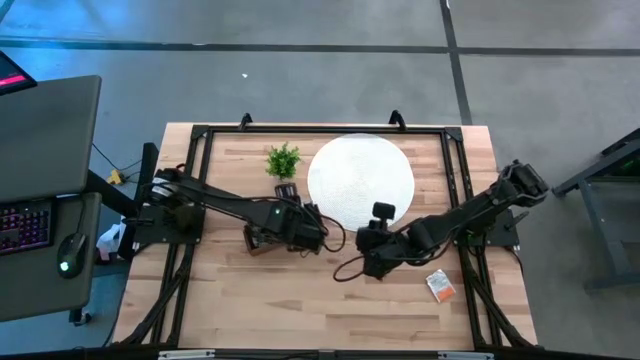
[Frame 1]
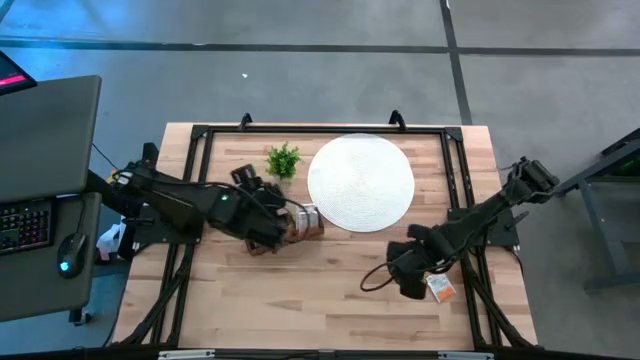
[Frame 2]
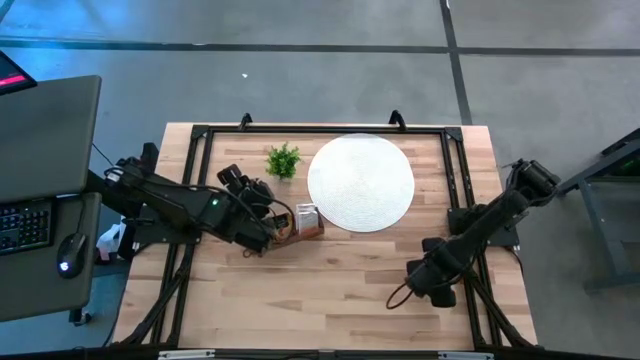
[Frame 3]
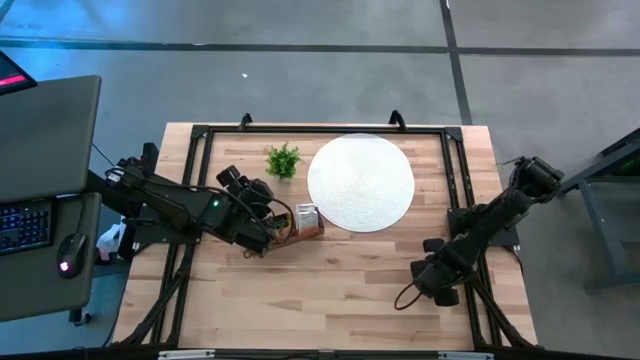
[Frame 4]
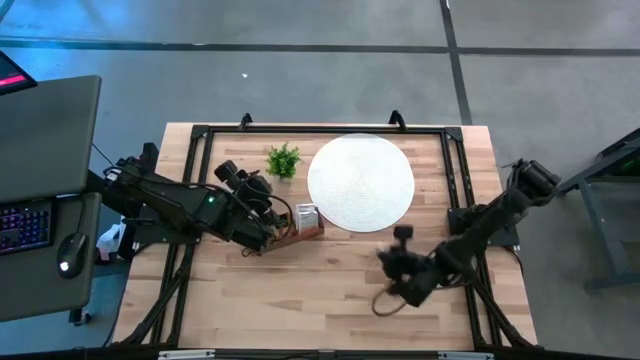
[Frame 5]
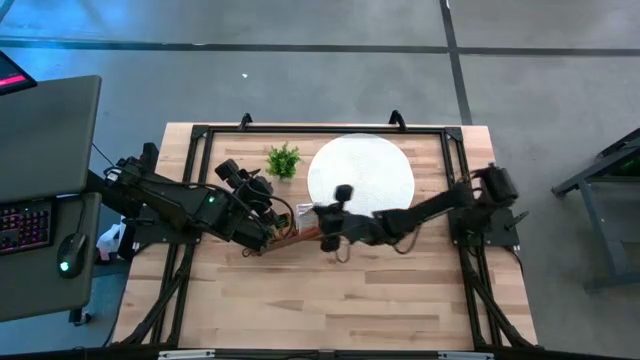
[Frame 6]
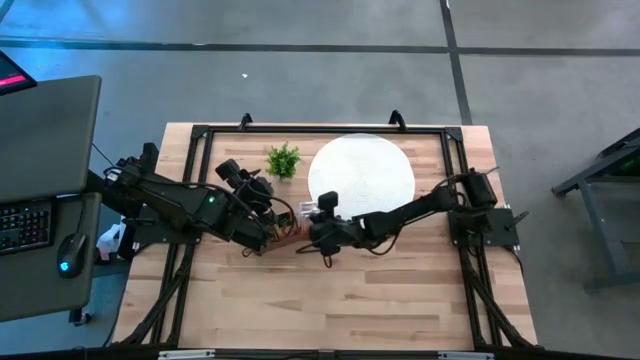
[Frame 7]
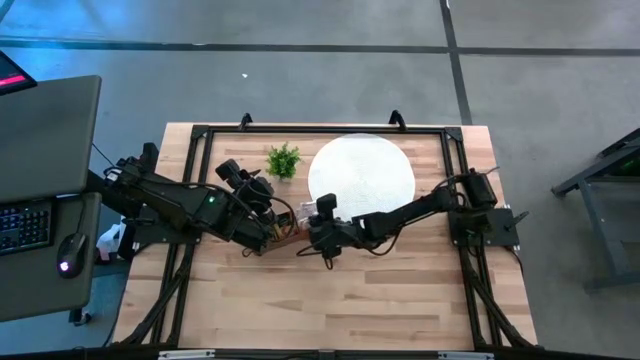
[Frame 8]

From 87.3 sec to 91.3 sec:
Task: Pick & Place Tea
Put the orange tea bag into the right section of the wooden organizer

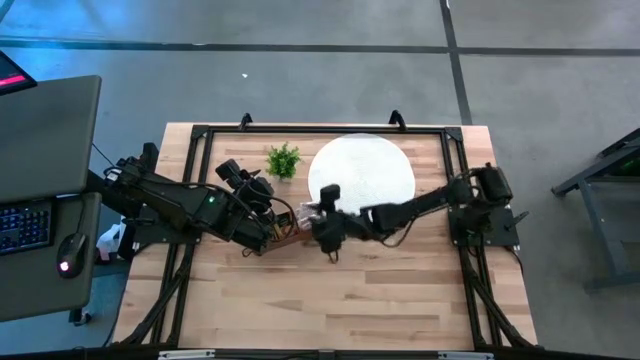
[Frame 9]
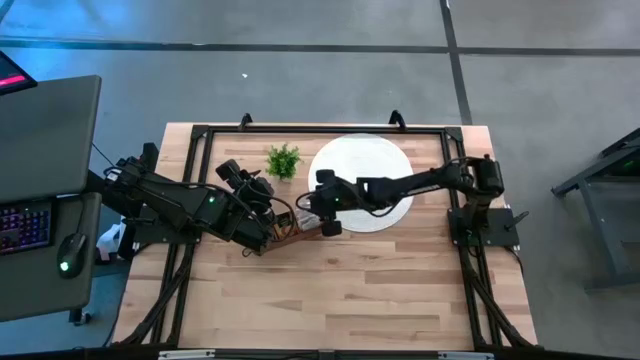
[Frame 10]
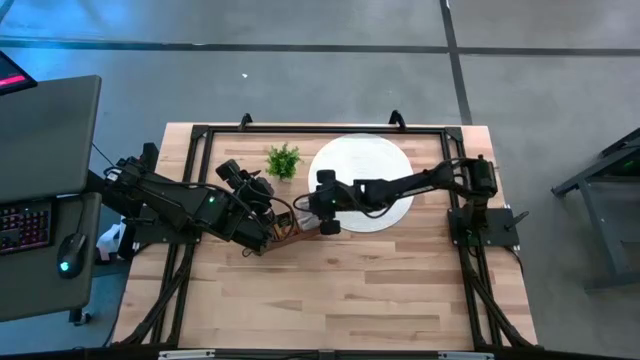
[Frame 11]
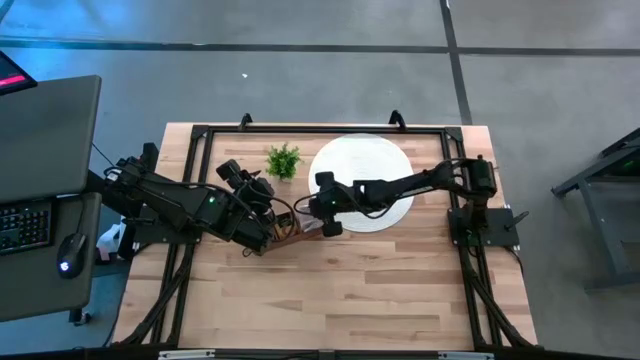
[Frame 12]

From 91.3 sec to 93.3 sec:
Adjust the orange tea bag in the wooden organizer

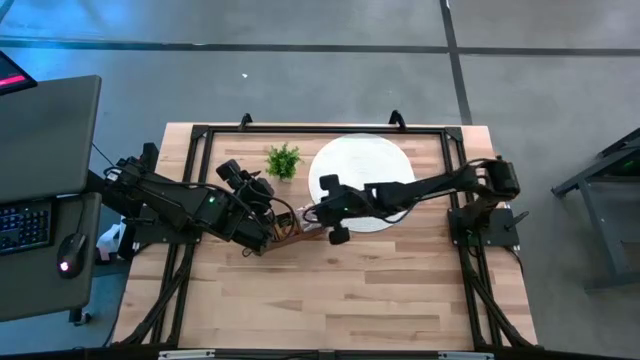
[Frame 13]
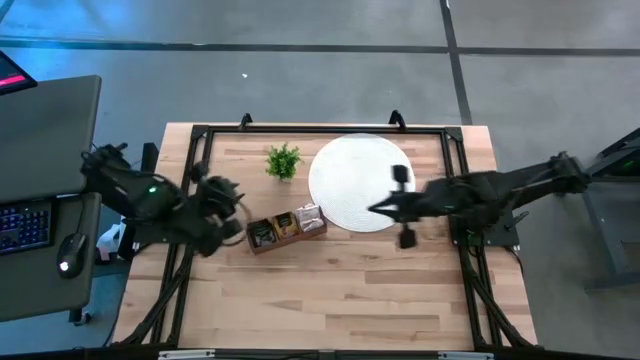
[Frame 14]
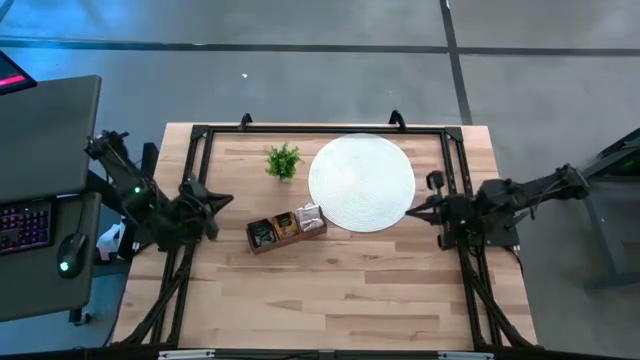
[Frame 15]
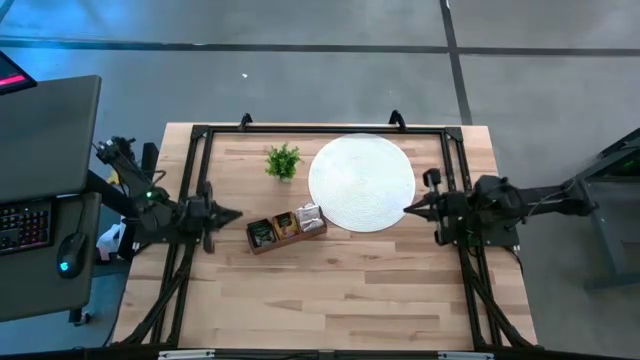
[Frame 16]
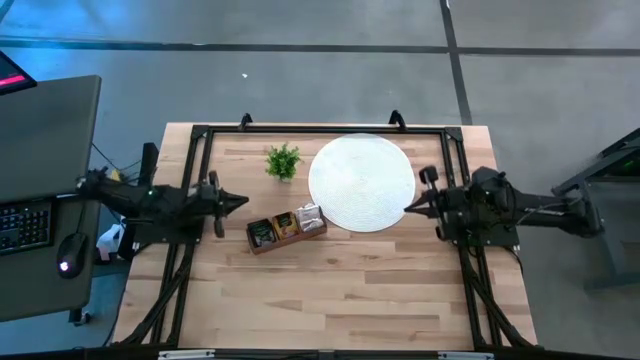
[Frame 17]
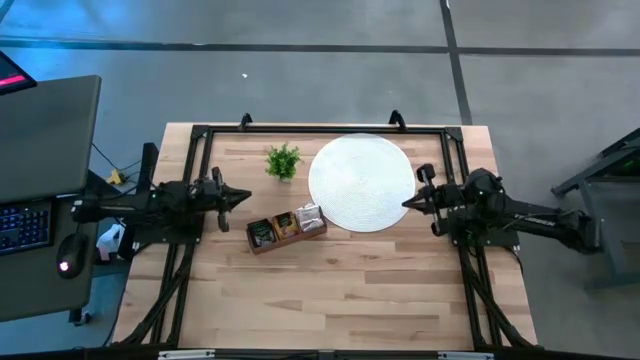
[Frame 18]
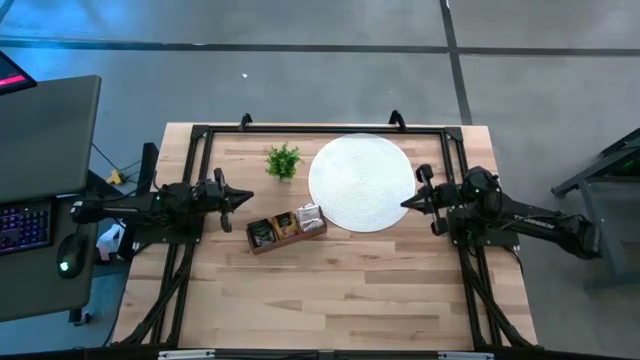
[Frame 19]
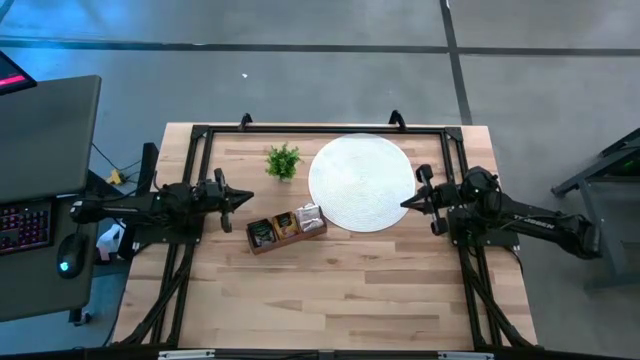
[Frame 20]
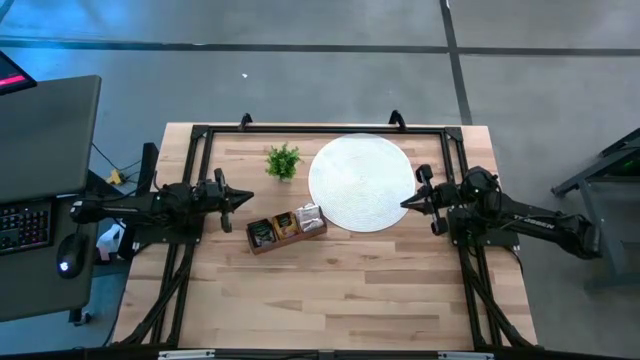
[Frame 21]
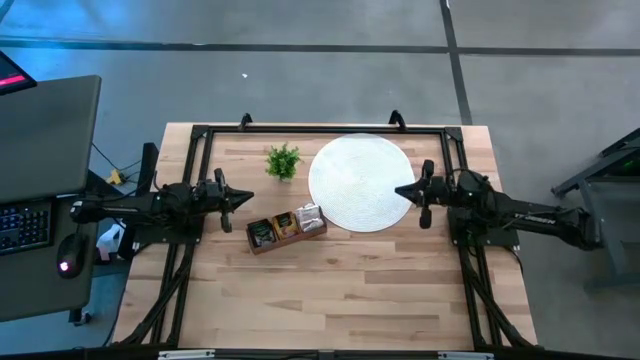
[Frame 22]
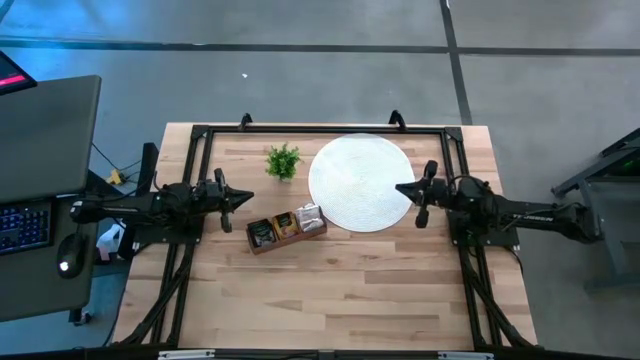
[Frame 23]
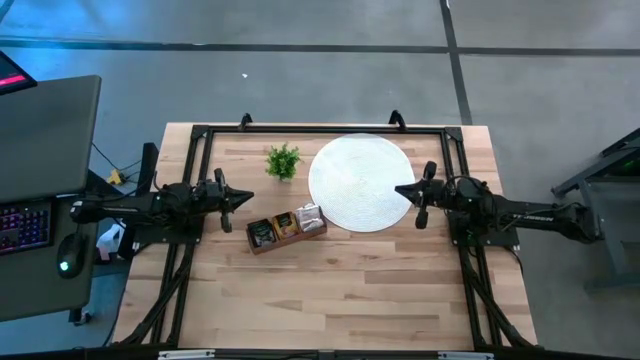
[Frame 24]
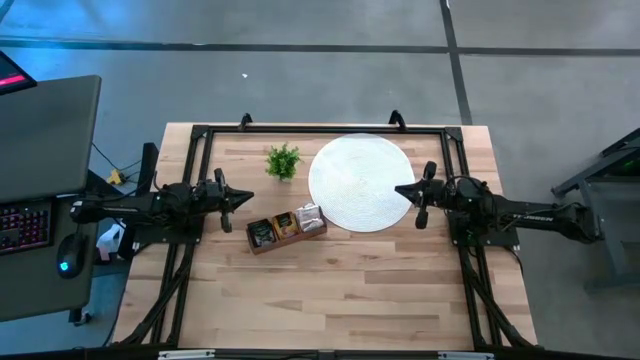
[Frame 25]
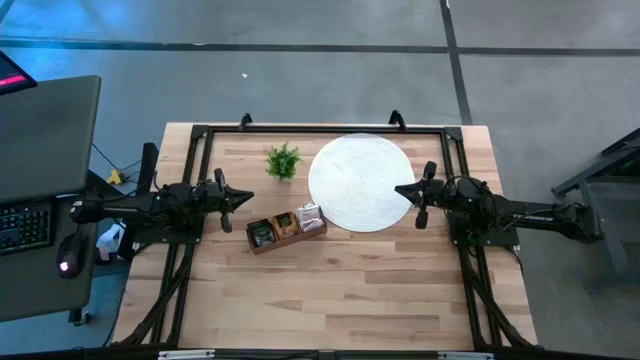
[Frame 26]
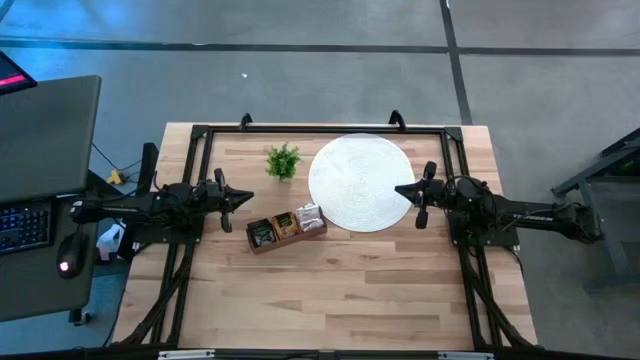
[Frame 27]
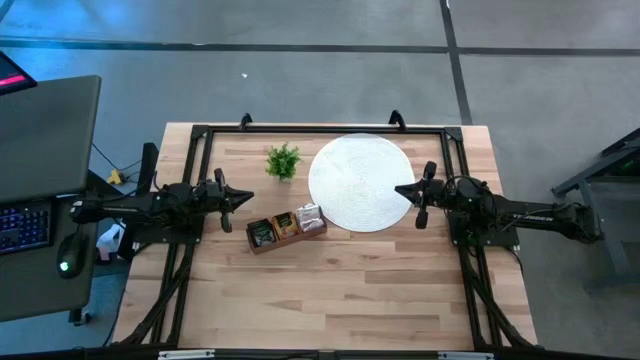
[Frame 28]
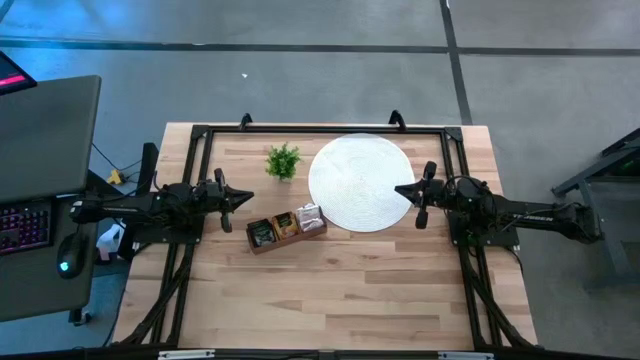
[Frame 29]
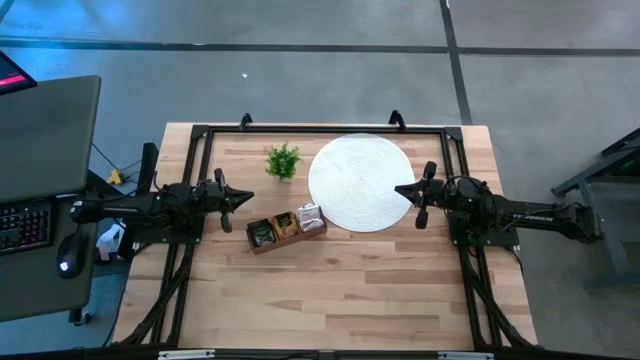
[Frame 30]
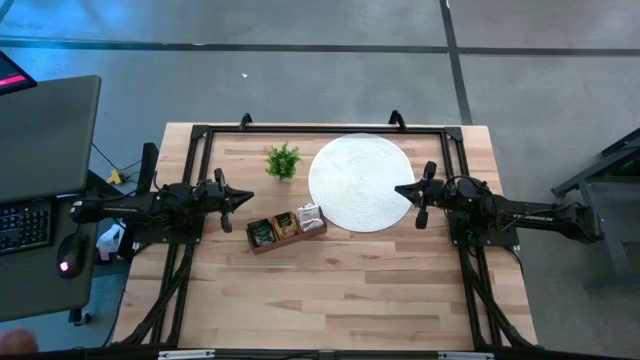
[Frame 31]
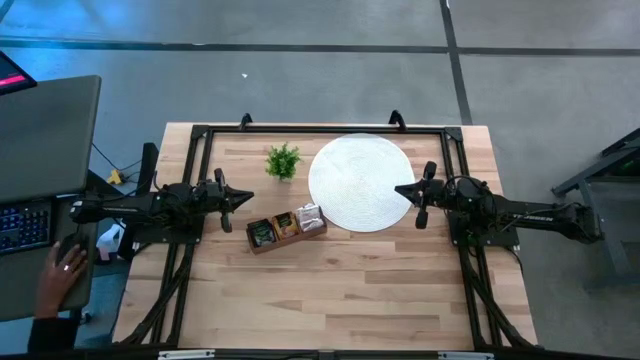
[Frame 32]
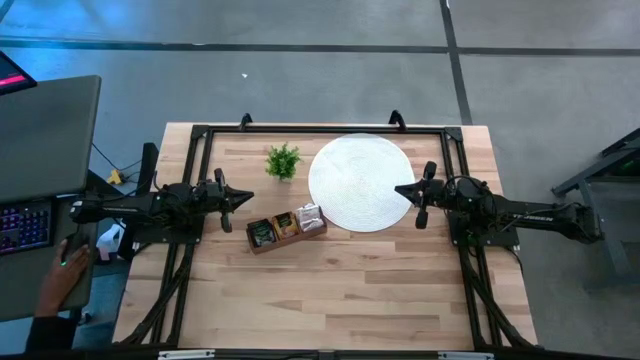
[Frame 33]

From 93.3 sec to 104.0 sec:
Return to Home Position

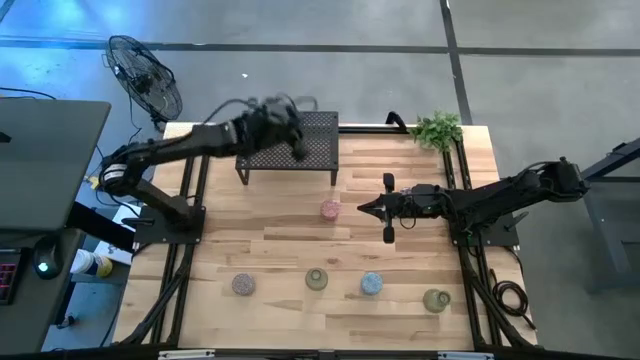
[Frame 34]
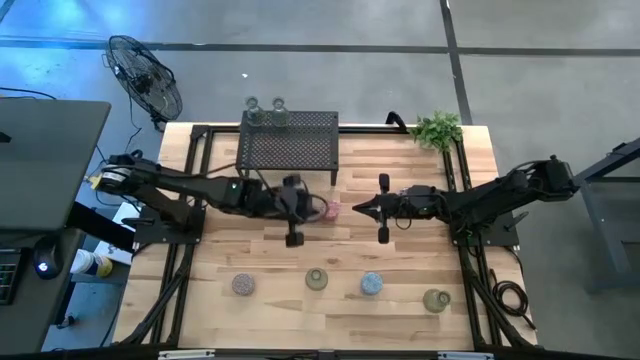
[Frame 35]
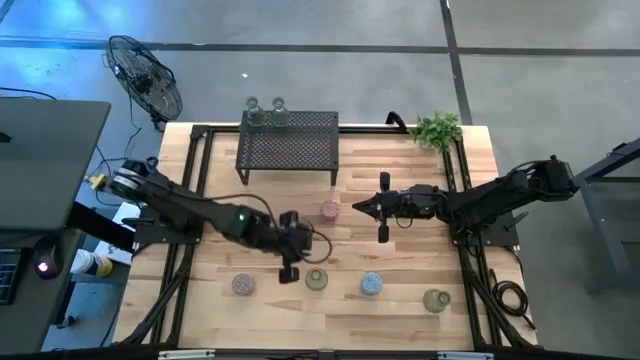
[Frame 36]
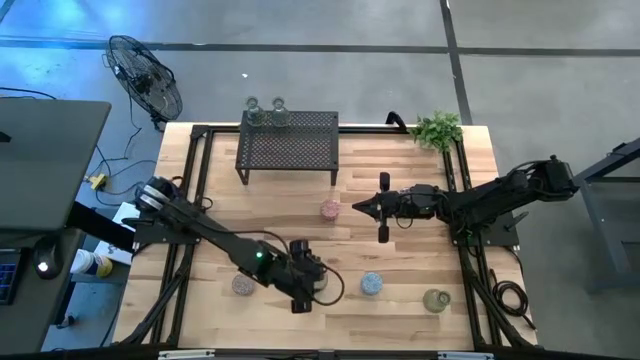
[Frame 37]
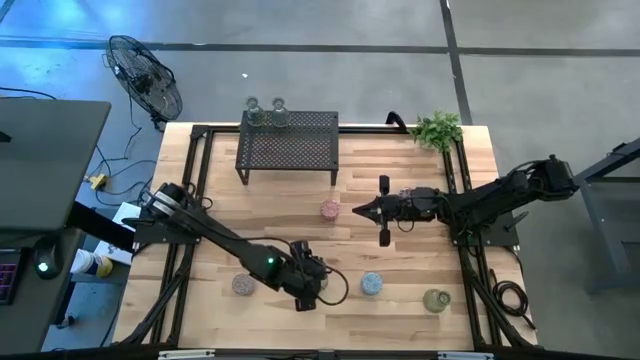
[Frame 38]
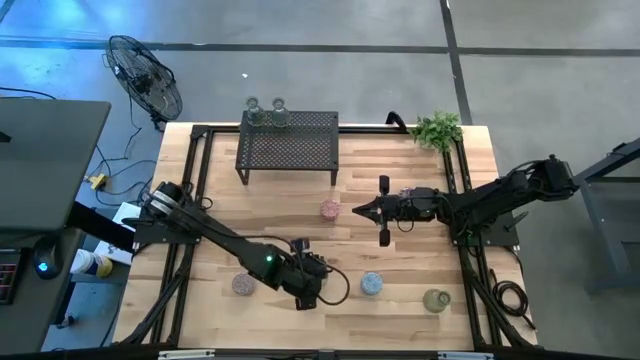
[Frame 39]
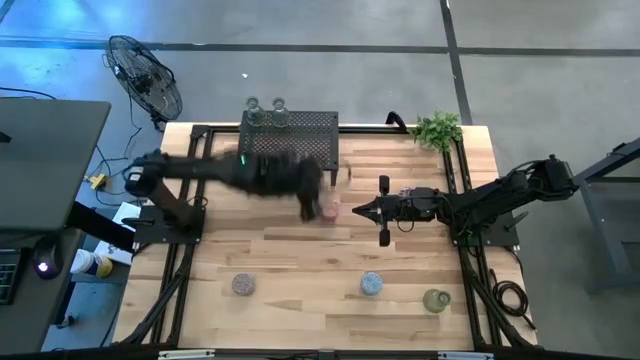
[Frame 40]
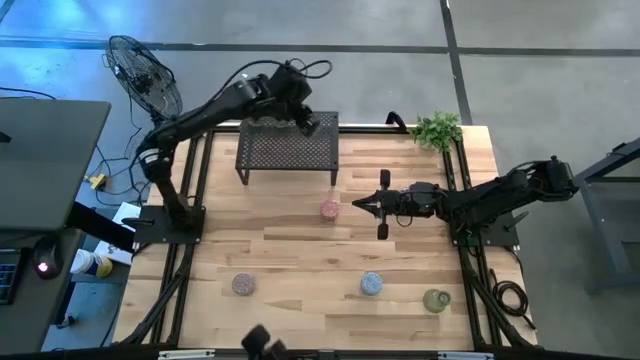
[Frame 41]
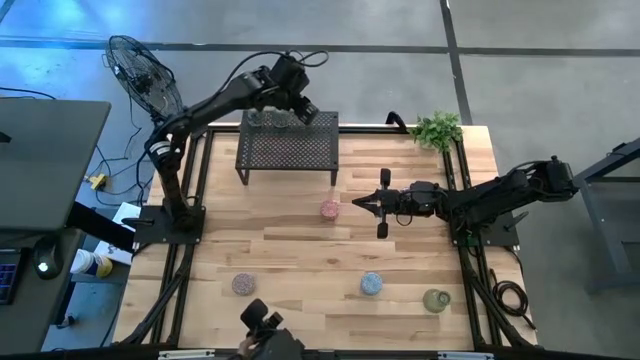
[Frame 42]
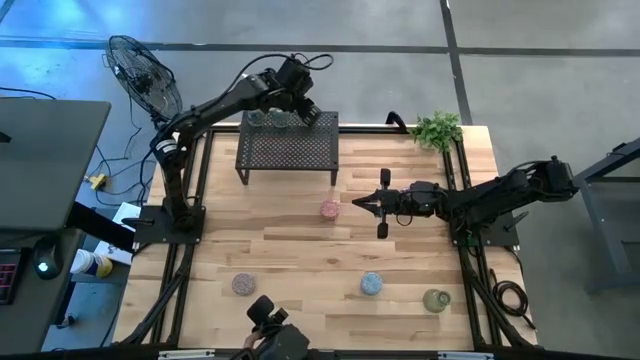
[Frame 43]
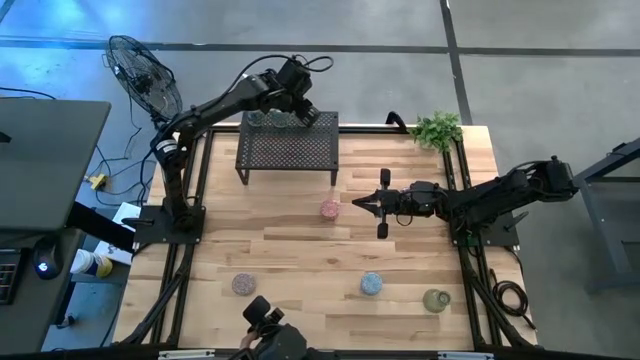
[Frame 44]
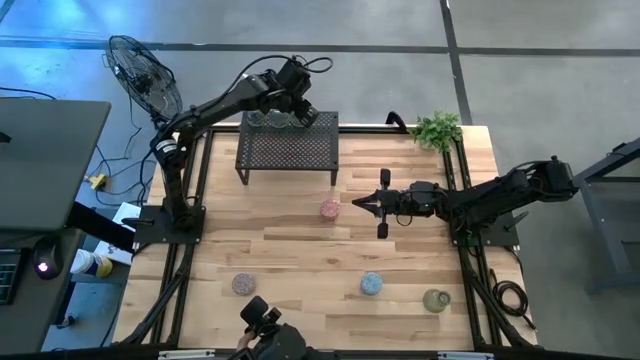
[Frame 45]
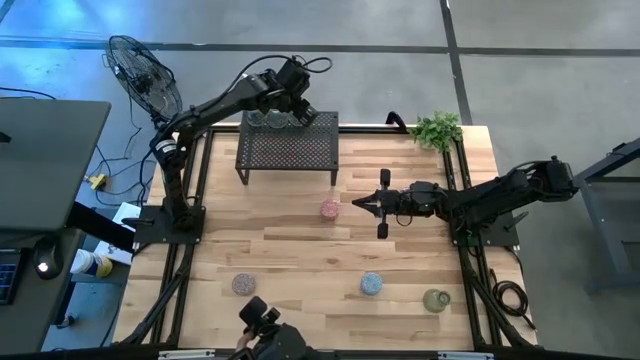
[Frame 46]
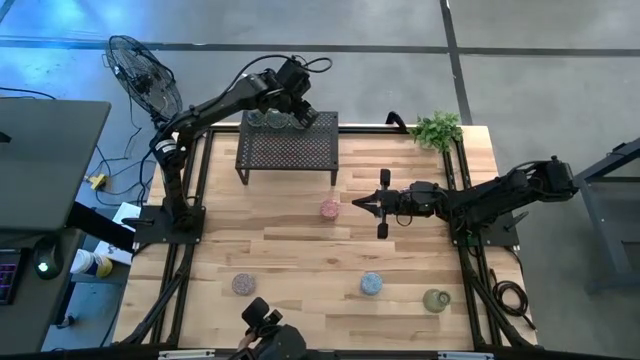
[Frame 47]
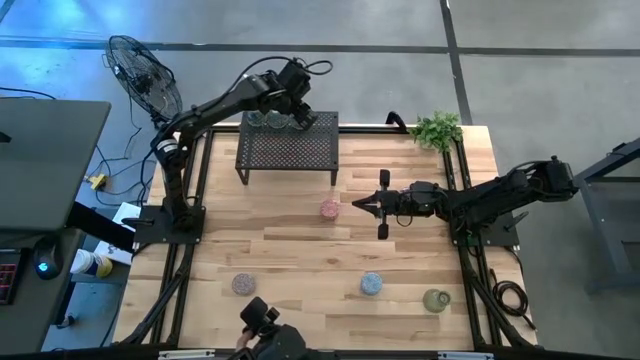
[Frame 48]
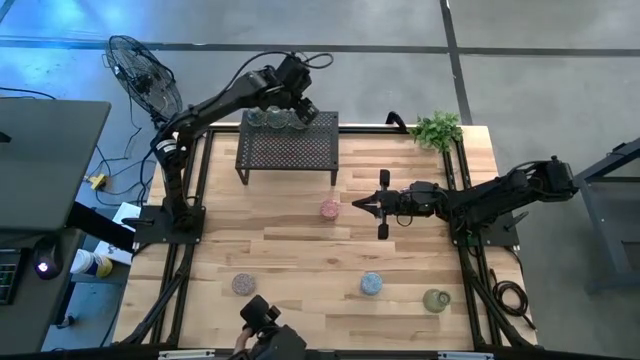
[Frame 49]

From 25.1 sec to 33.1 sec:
Task: Pick & Place candle stick holders
Put the green glass candle holder on the shelf
